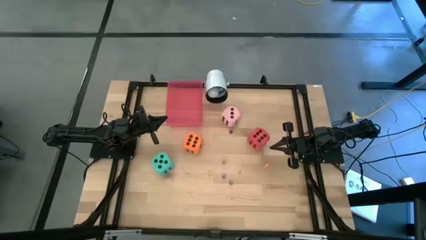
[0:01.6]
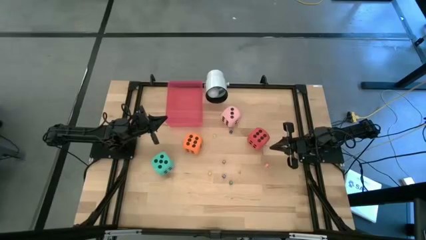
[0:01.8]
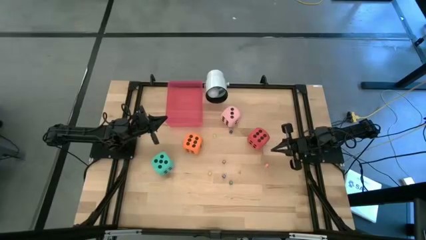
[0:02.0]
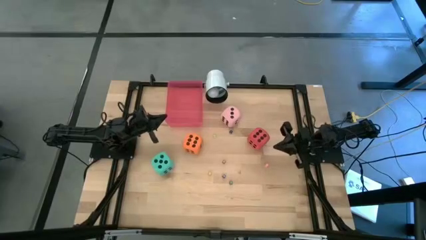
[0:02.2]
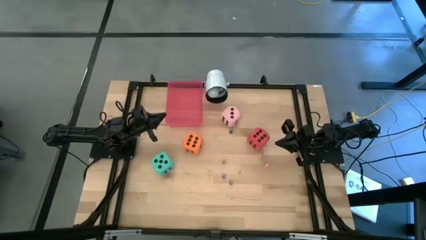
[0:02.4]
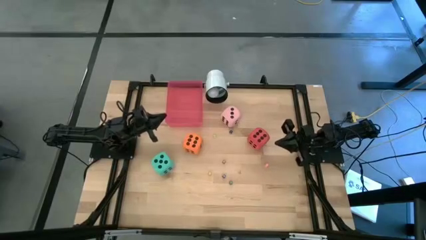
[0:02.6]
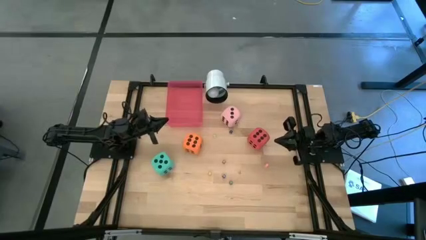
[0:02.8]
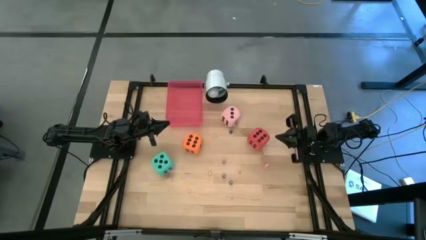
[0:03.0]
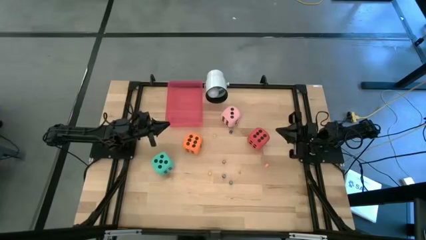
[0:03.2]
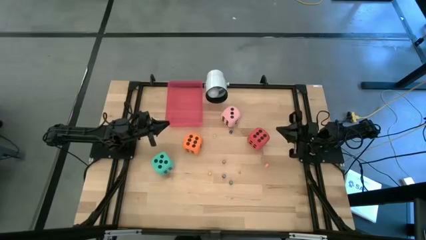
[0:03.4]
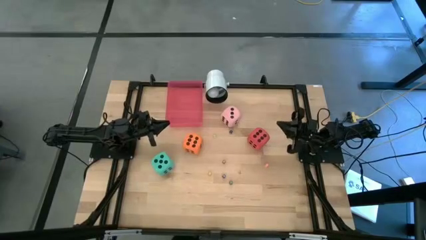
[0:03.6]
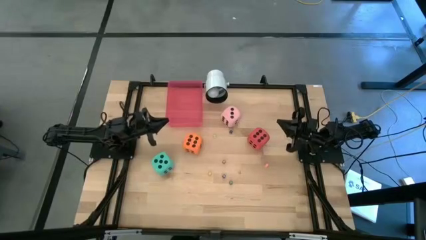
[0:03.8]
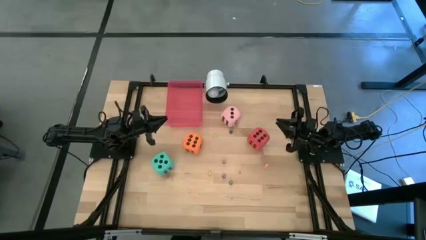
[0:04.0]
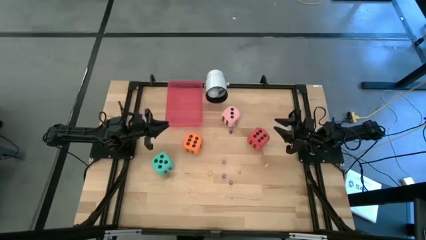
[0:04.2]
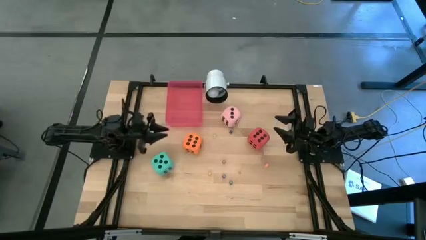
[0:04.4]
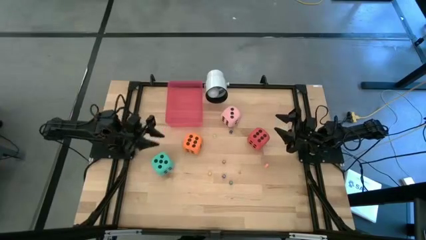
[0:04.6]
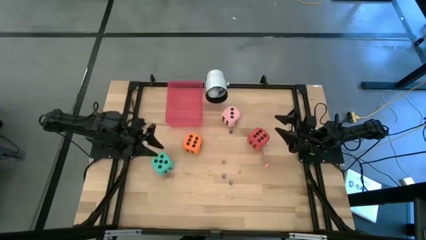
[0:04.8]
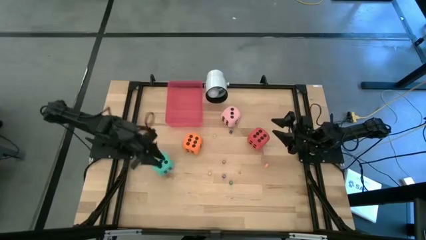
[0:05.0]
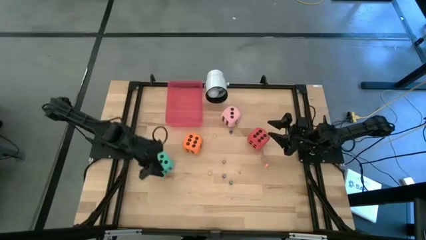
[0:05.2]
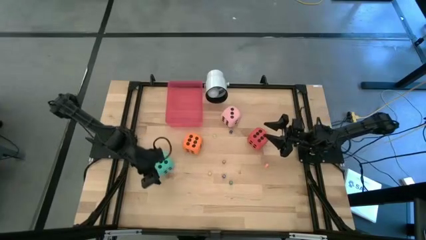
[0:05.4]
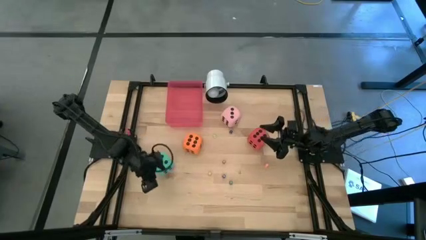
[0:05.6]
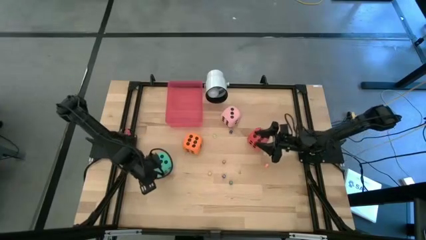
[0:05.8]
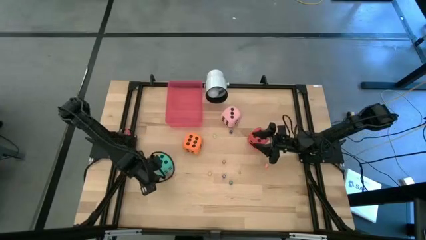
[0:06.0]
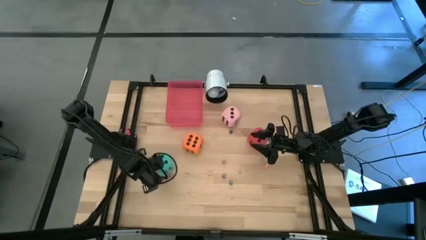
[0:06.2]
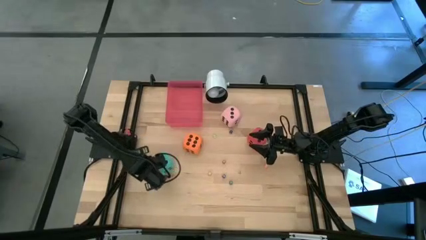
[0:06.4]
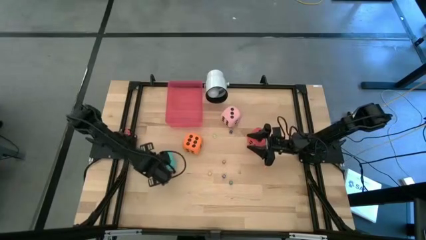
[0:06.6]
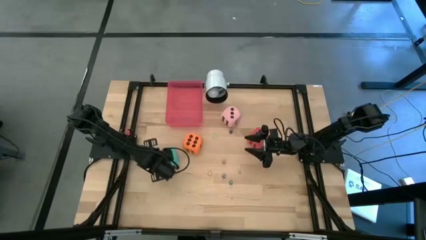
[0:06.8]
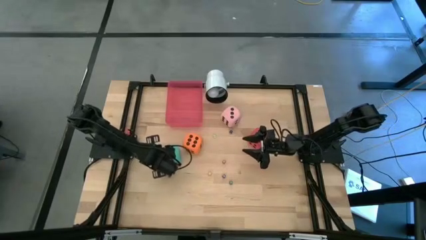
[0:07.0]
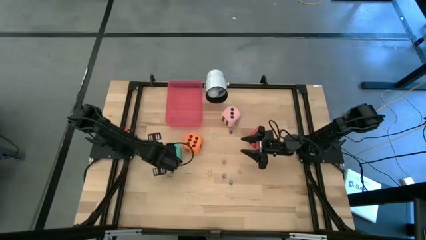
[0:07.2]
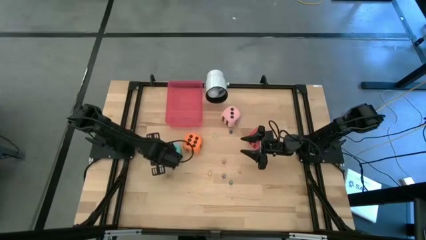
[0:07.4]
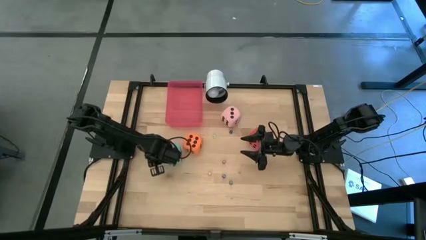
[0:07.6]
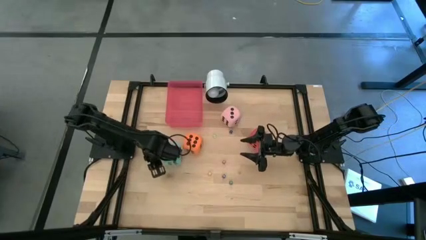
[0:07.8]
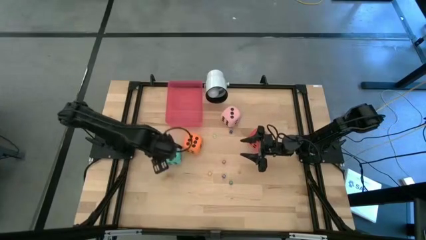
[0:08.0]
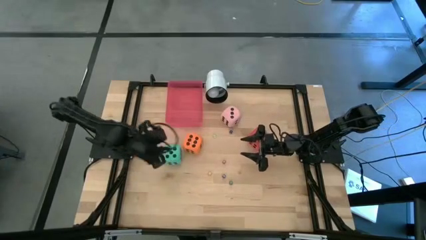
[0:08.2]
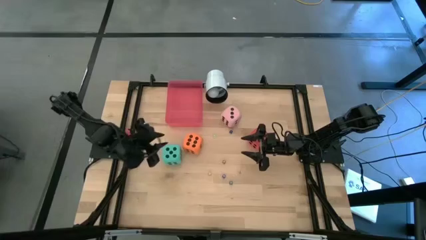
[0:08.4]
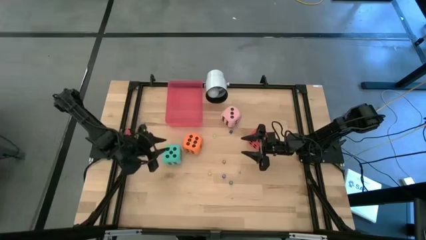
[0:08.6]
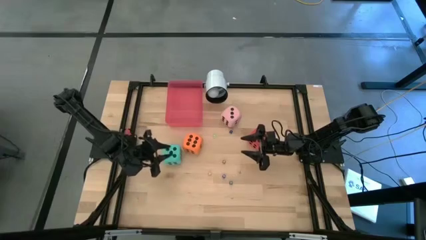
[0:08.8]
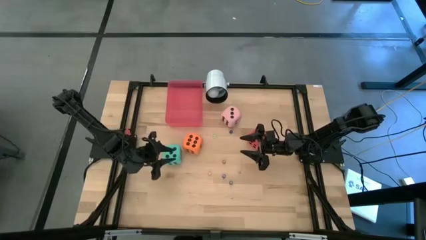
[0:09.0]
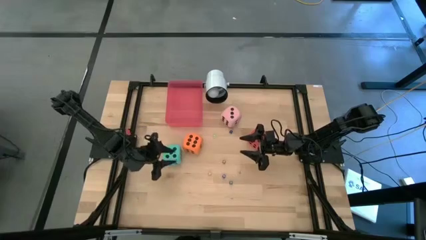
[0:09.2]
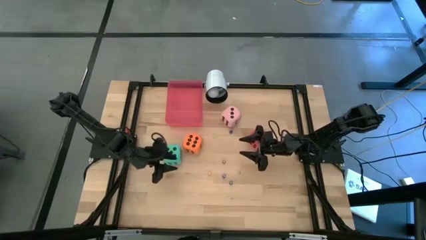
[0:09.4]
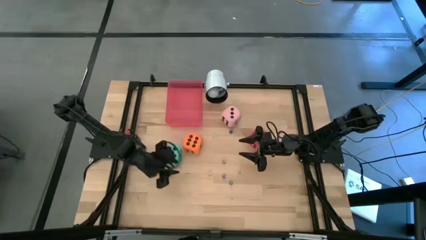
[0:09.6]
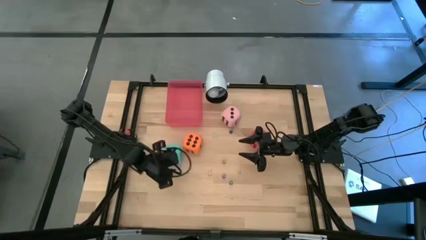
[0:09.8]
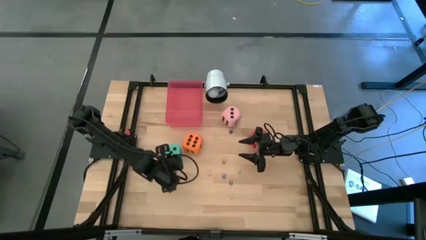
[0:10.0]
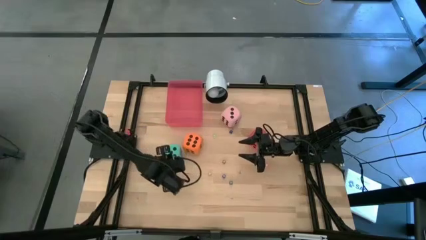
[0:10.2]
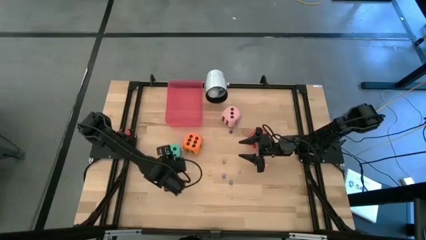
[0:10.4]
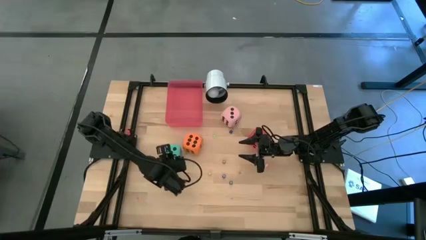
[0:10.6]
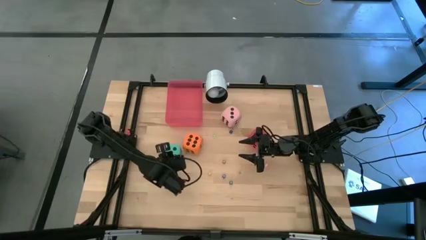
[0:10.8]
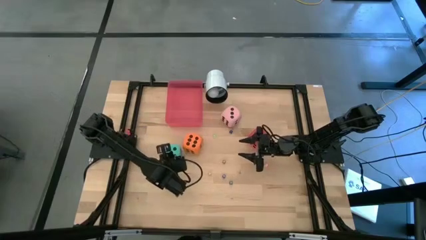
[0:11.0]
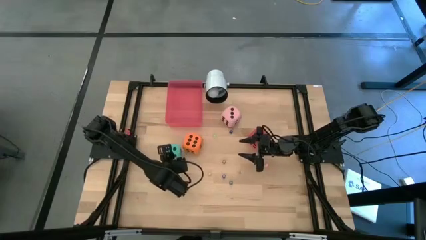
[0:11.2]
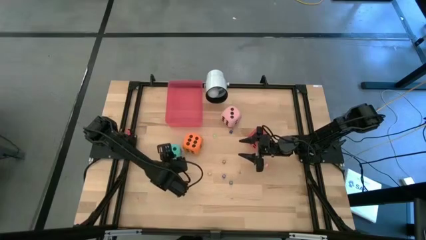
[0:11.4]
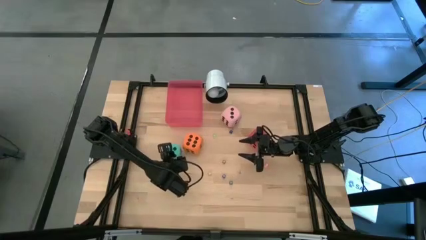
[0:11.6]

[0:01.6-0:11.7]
Task: Pick & Place Dice
Put the big light blue dice into the red bin
